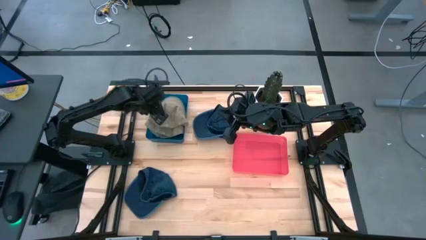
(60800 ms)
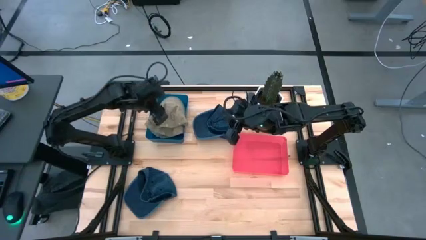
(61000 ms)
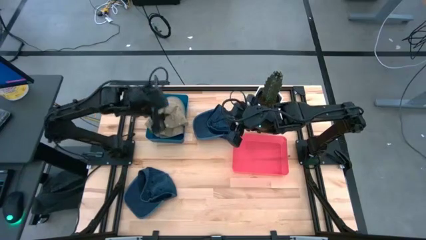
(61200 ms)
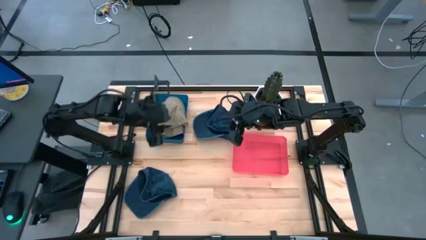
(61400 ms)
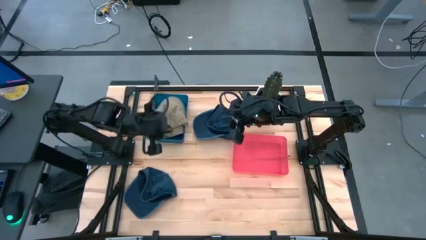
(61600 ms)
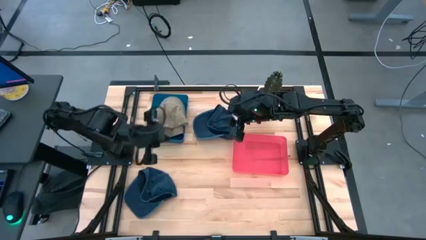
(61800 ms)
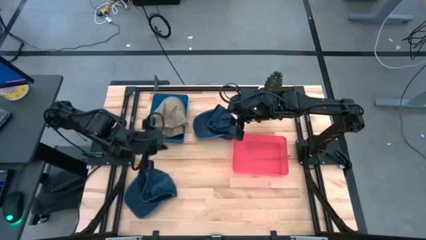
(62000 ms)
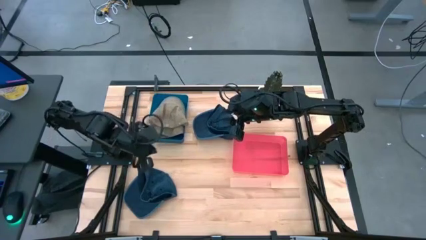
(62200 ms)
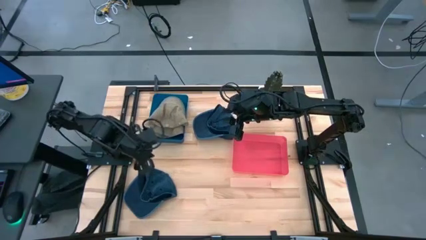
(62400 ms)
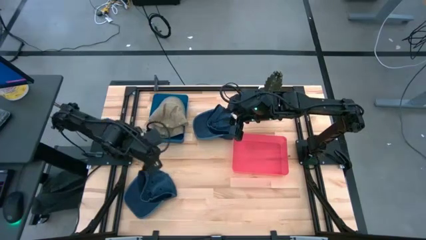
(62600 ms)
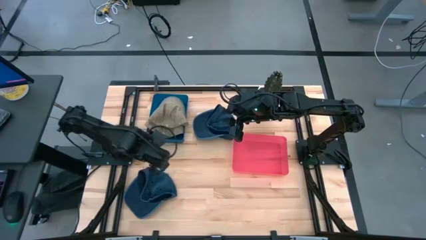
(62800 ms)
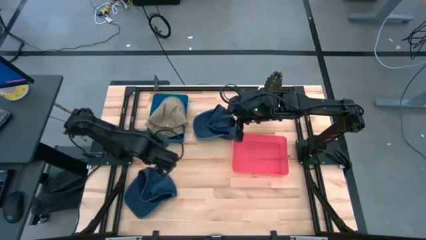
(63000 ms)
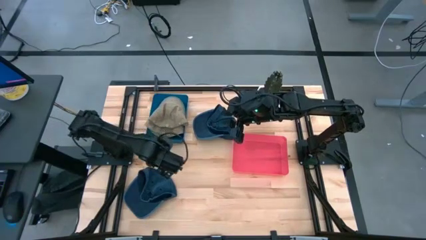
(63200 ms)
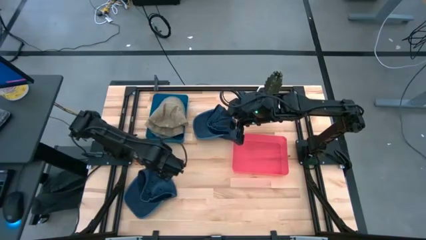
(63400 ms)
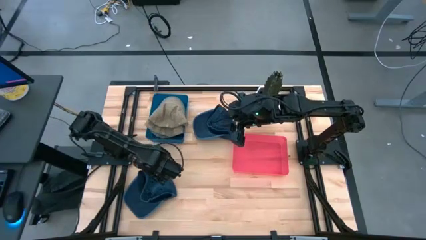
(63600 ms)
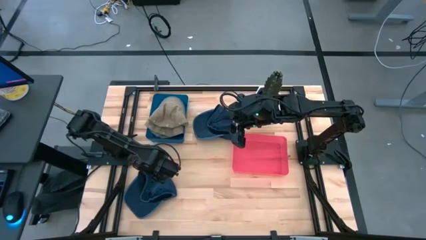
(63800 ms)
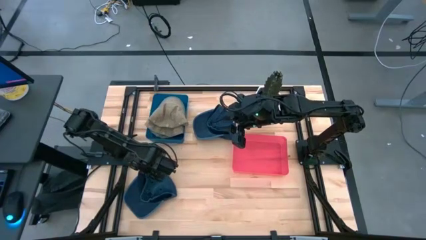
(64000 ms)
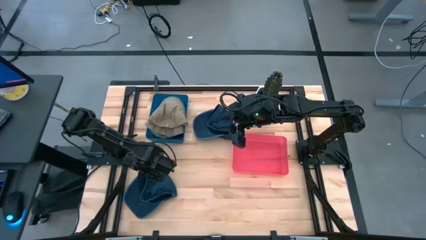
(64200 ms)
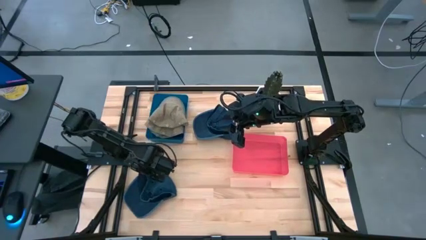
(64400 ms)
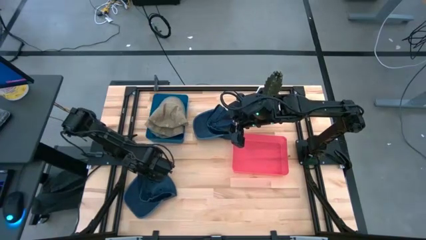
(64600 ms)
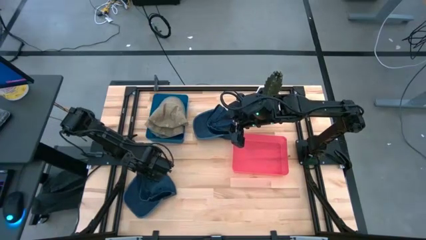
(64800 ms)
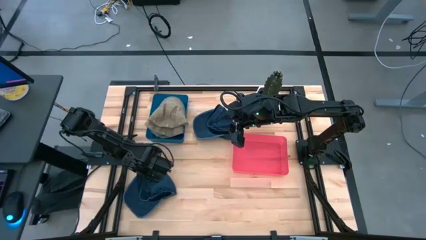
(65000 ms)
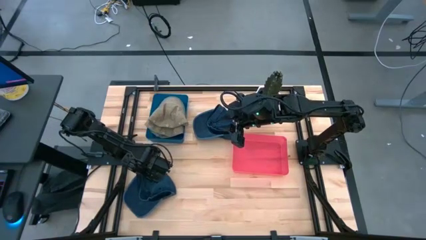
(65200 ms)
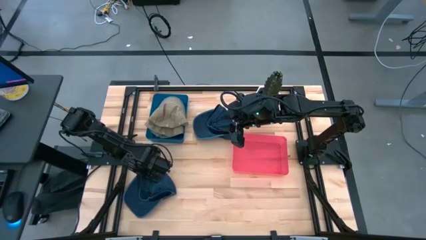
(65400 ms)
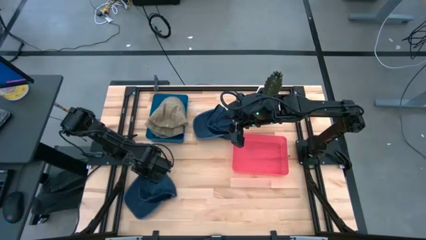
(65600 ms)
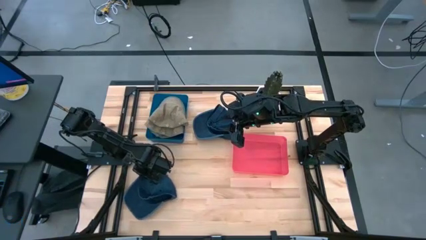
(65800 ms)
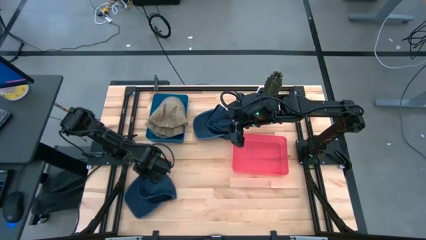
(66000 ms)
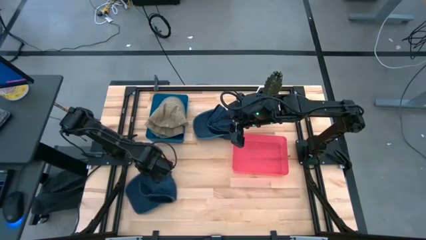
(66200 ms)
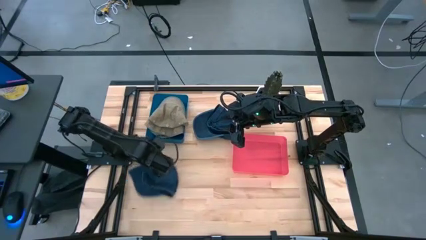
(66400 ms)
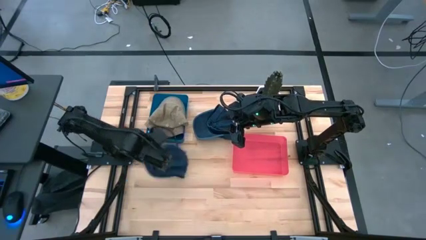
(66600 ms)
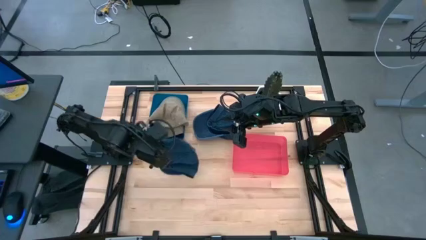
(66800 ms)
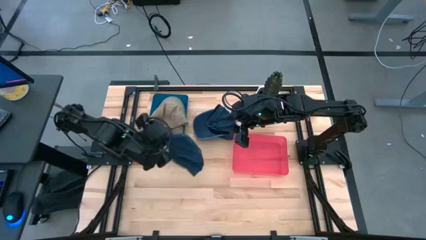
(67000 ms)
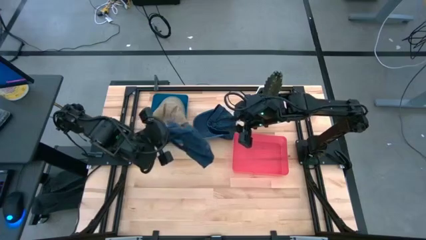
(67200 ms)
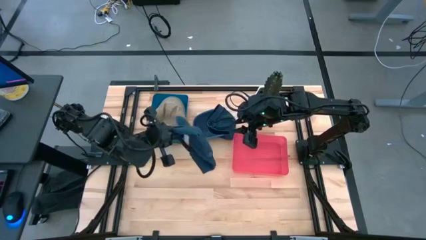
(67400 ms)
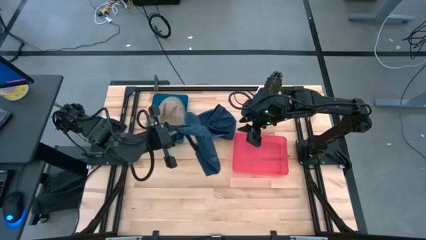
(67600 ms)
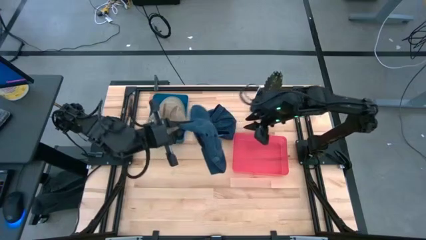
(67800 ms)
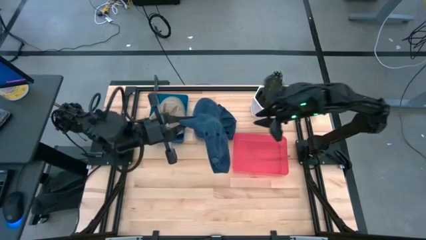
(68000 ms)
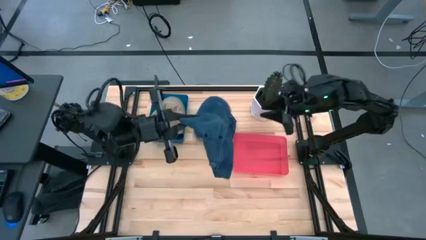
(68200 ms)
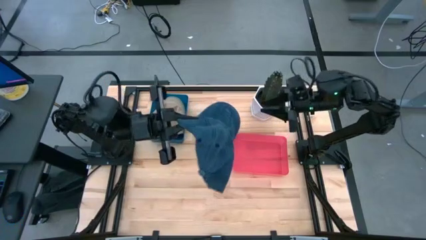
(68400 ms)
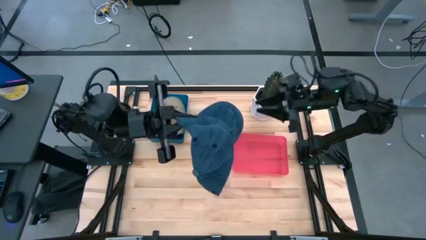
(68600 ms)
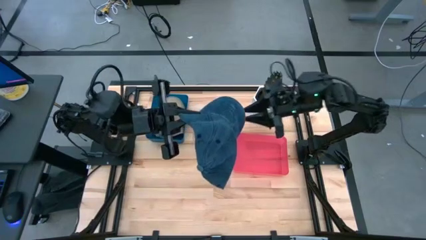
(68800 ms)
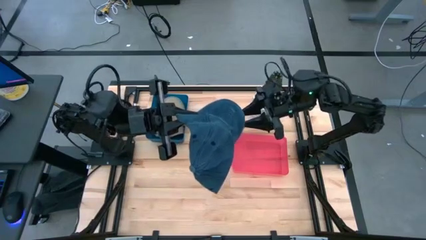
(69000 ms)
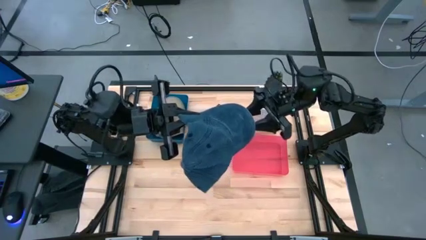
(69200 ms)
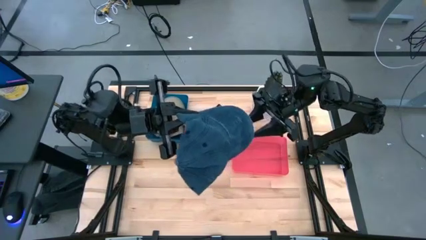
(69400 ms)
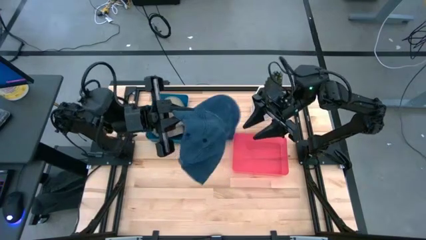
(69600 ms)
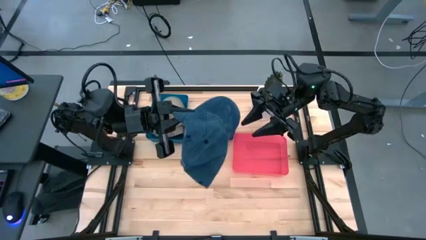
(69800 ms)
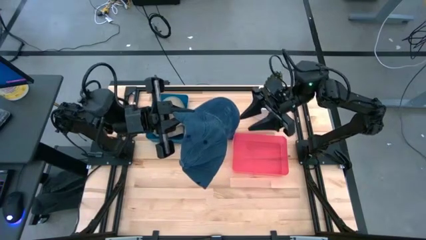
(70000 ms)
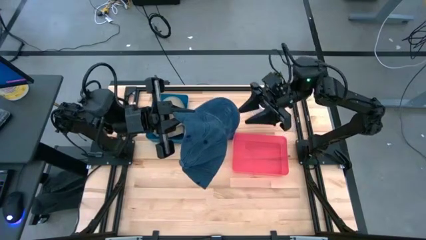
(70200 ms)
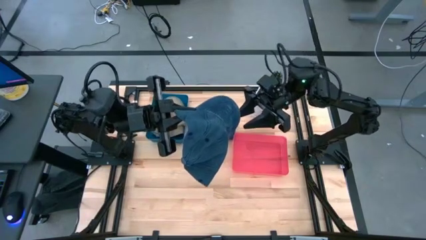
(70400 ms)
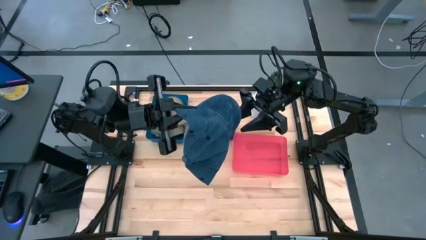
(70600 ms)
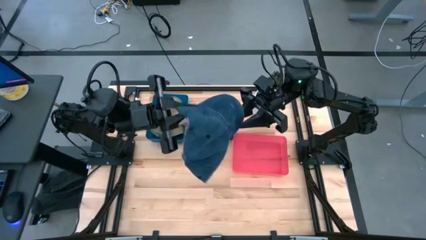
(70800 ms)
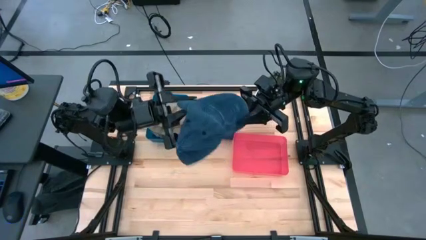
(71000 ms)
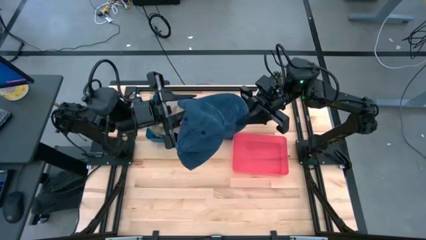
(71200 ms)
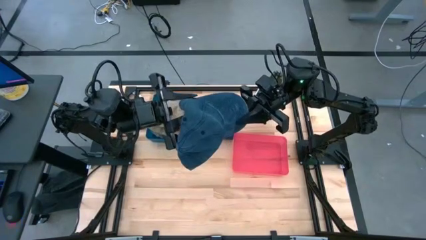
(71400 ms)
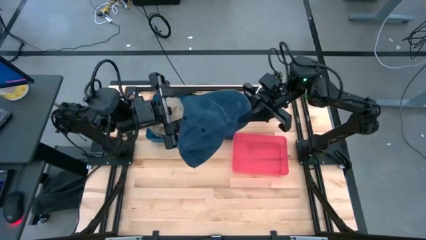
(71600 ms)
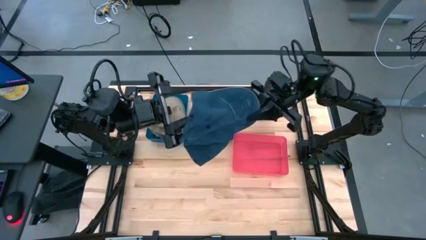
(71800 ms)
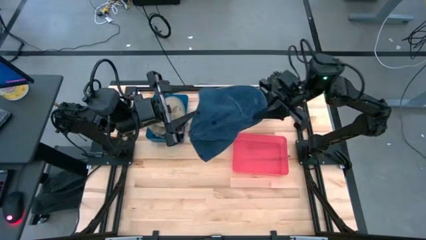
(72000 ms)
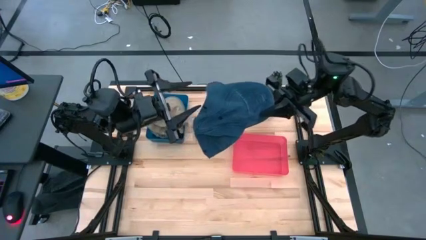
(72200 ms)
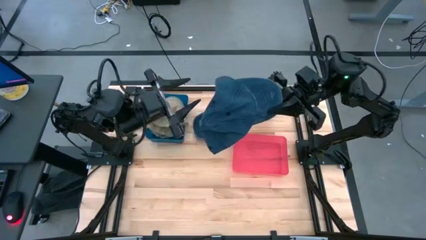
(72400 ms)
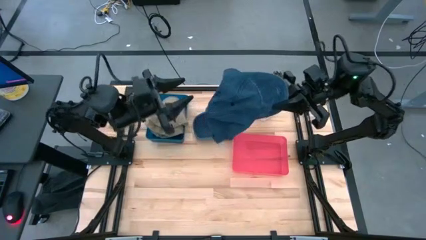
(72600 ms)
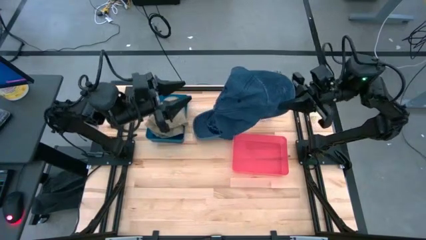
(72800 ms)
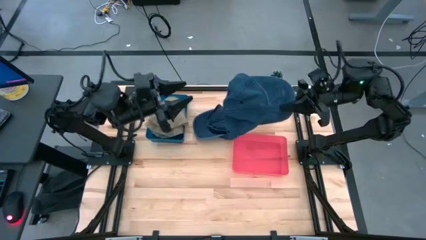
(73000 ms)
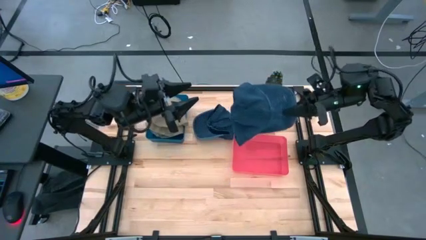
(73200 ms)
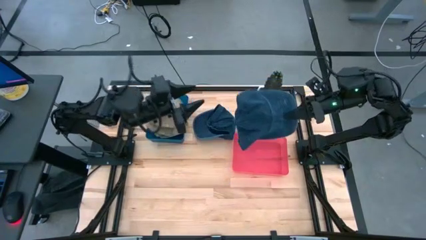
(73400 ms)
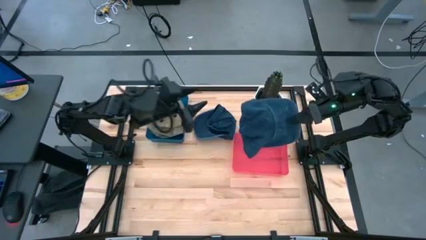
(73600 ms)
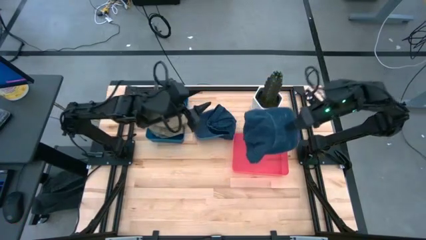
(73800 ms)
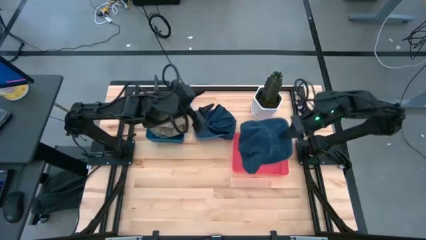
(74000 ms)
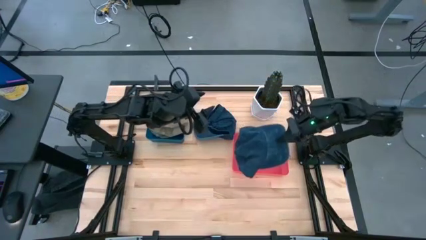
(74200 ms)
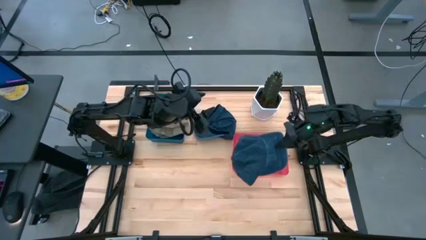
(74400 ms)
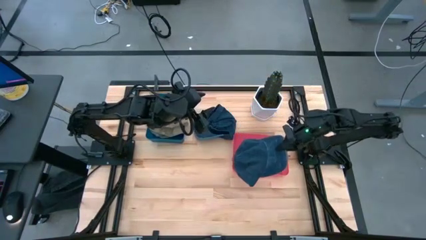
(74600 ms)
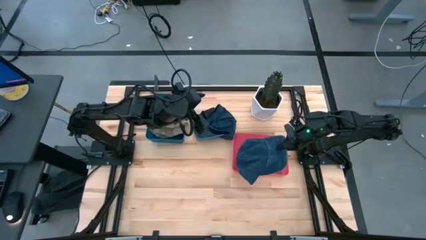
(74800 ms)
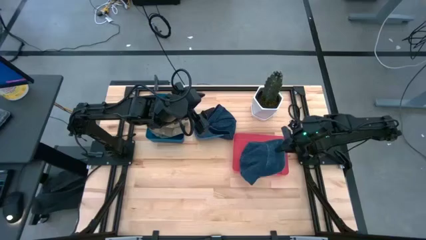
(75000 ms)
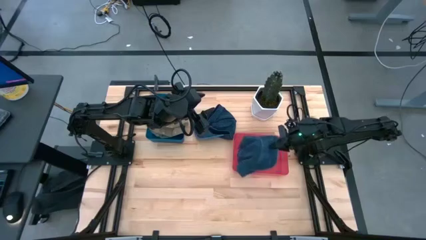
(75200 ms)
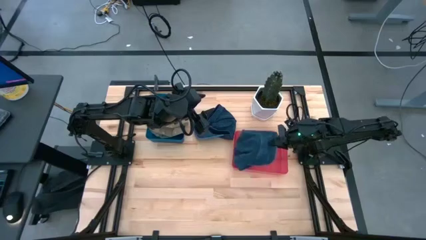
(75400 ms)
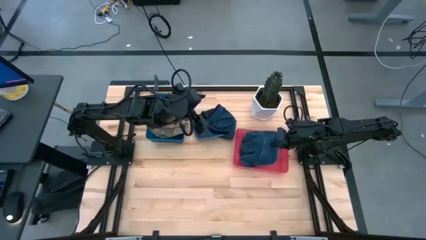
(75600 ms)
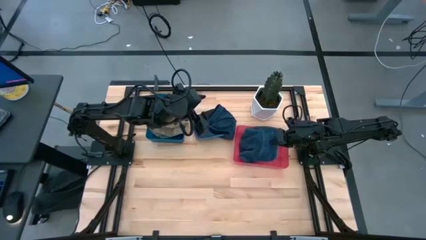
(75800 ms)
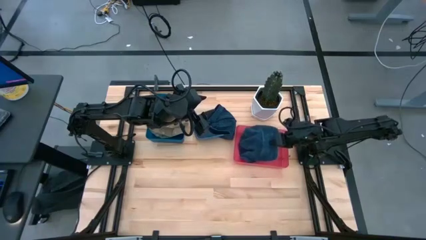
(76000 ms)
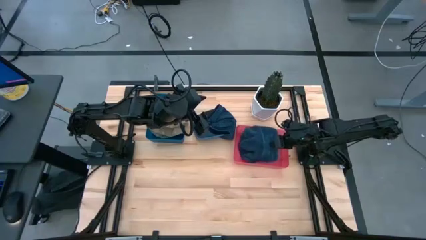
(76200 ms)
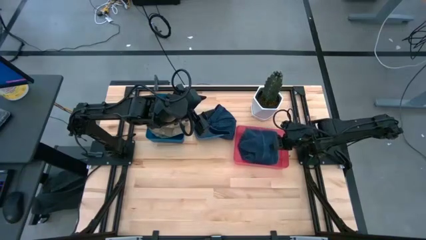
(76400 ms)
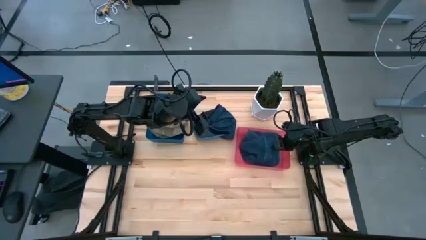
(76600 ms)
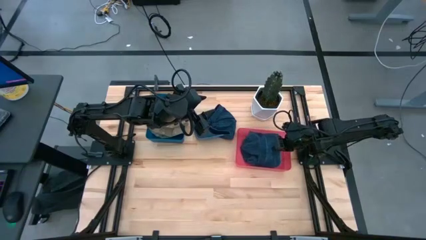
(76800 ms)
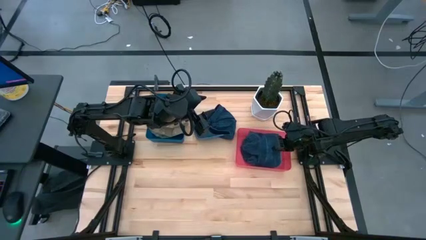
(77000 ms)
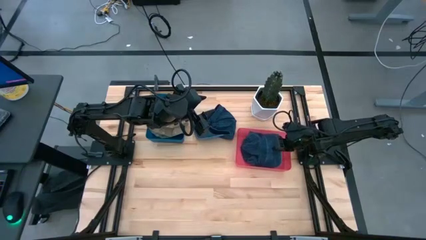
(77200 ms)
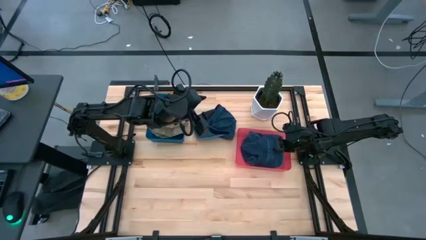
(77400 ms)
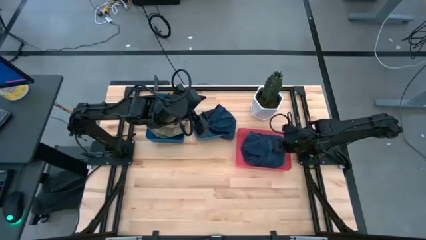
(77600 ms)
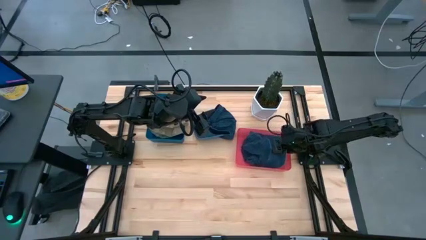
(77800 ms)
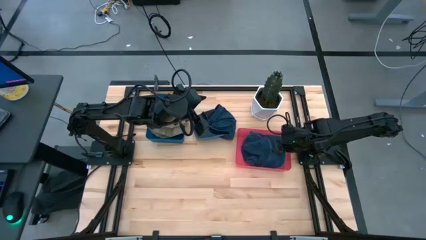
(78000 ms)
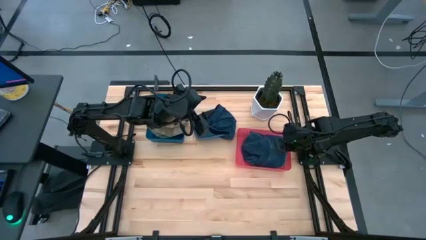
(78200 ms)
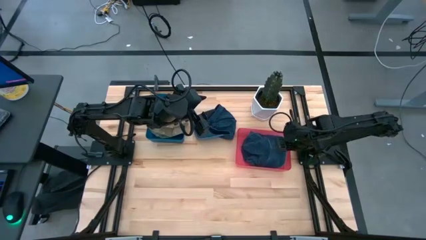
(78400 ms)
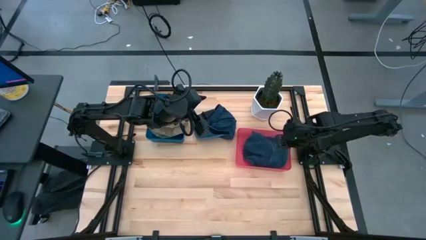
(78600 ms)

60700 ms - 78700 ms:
Task: Pick & Place hat
Put the bottom blue cap into the red bin
